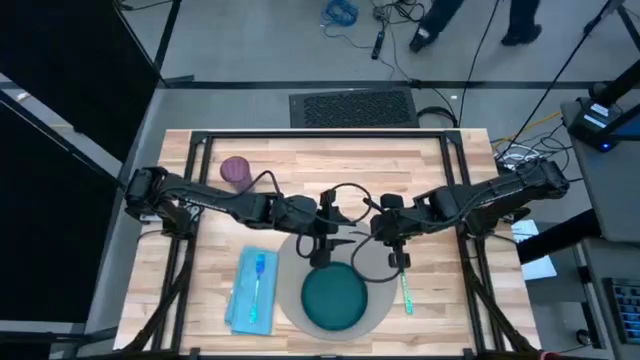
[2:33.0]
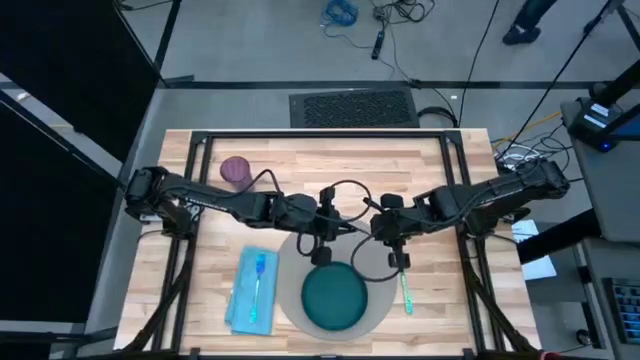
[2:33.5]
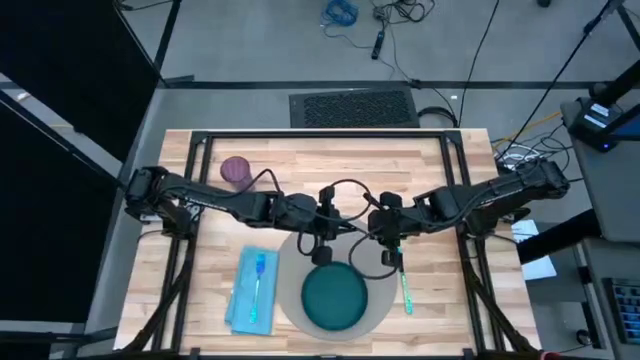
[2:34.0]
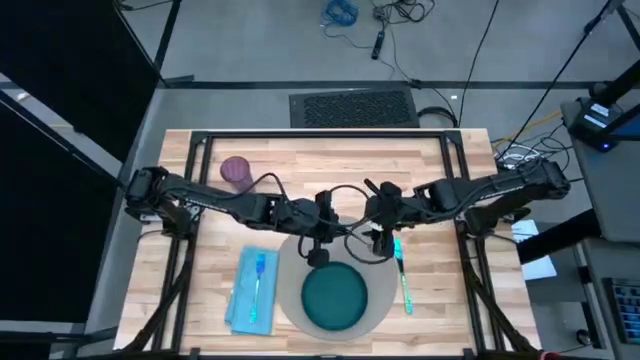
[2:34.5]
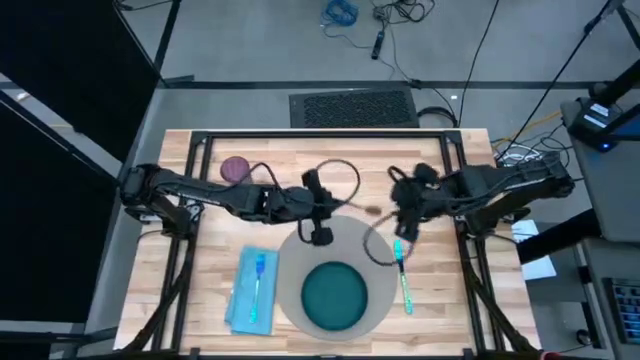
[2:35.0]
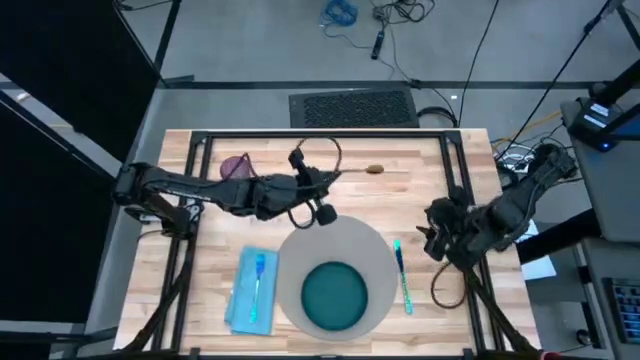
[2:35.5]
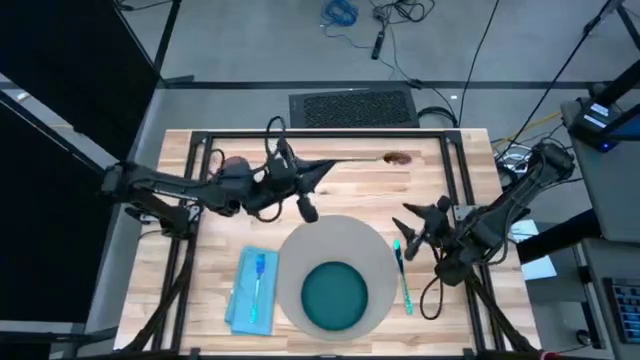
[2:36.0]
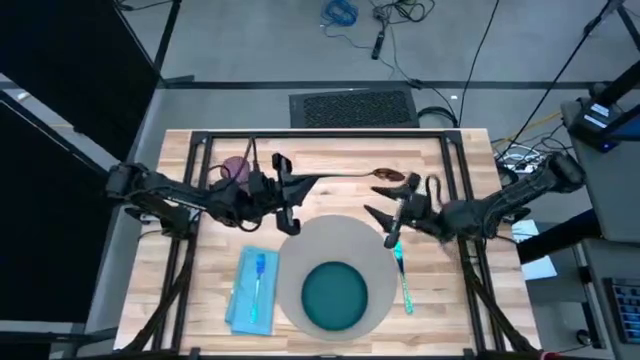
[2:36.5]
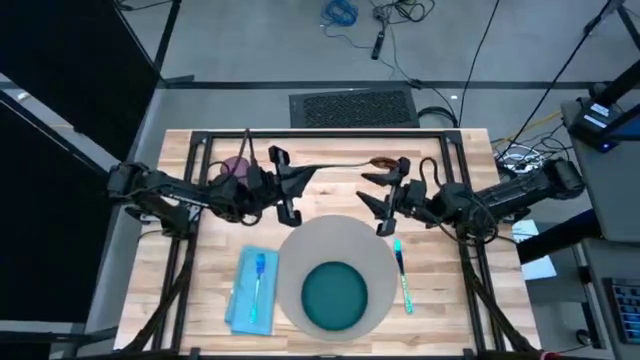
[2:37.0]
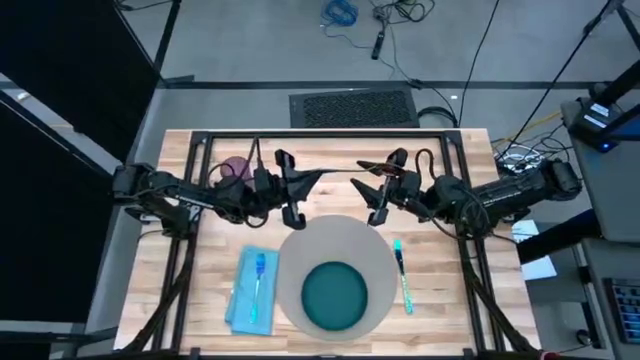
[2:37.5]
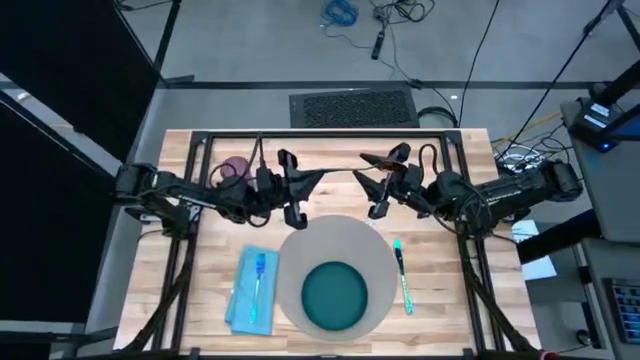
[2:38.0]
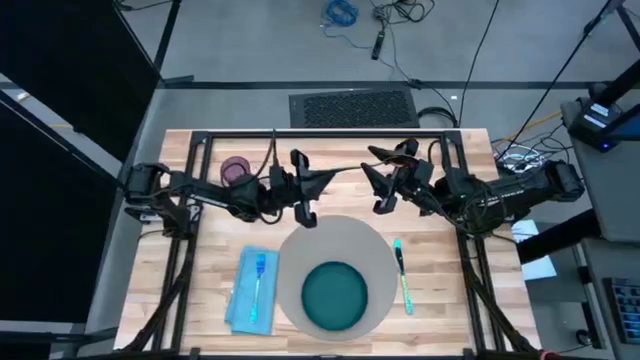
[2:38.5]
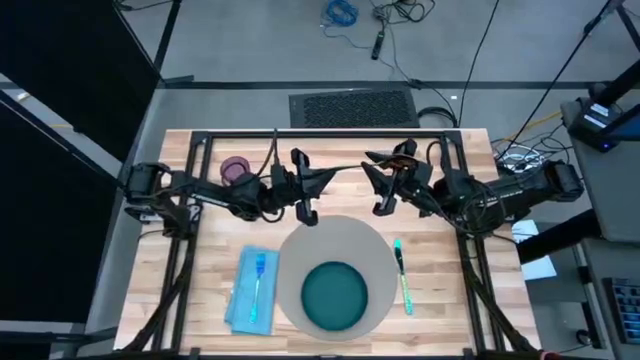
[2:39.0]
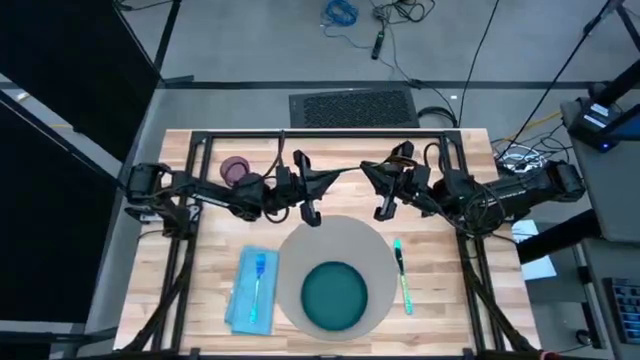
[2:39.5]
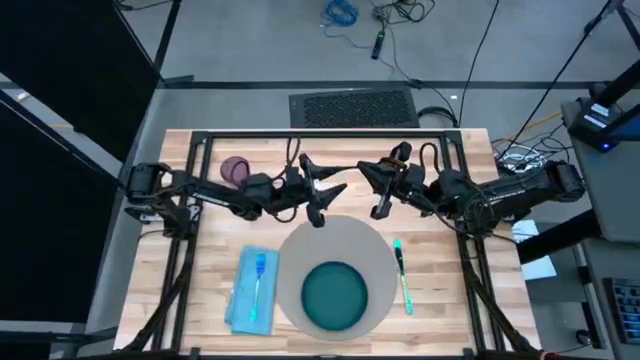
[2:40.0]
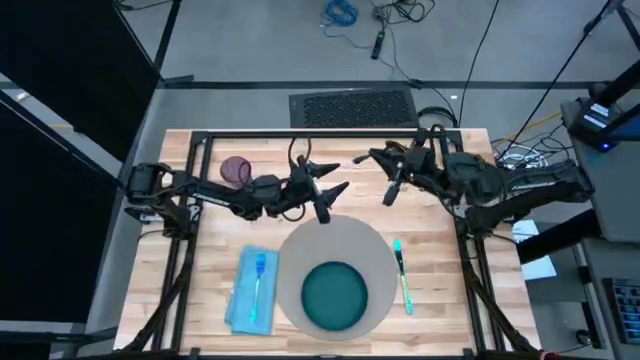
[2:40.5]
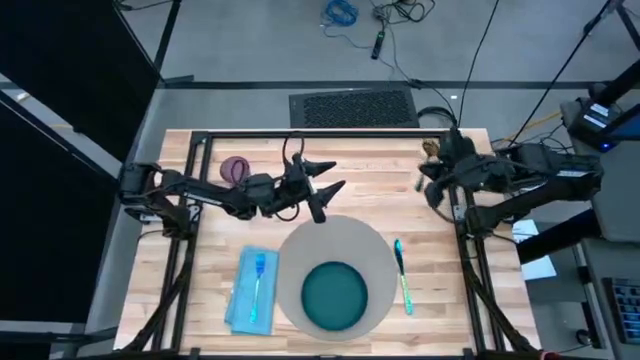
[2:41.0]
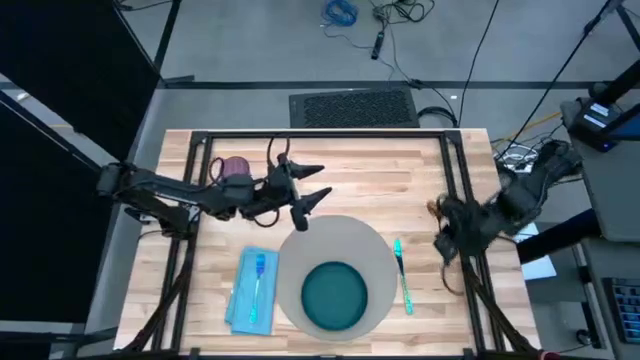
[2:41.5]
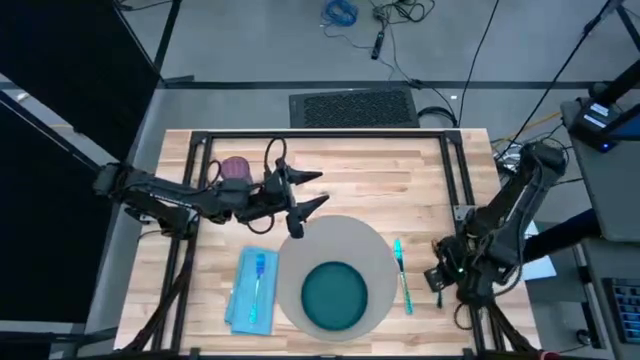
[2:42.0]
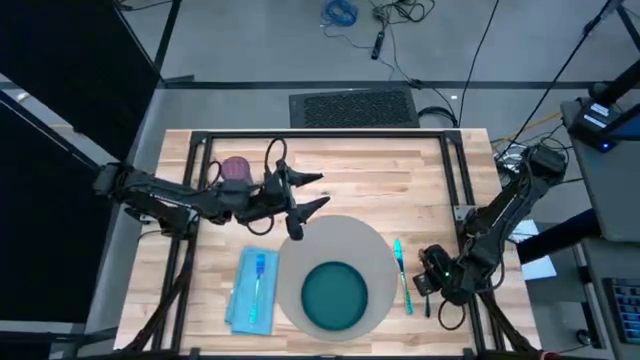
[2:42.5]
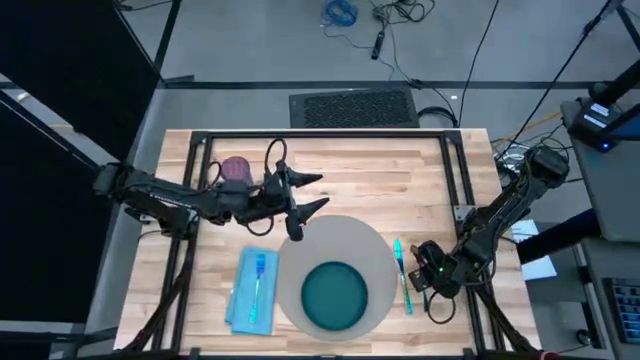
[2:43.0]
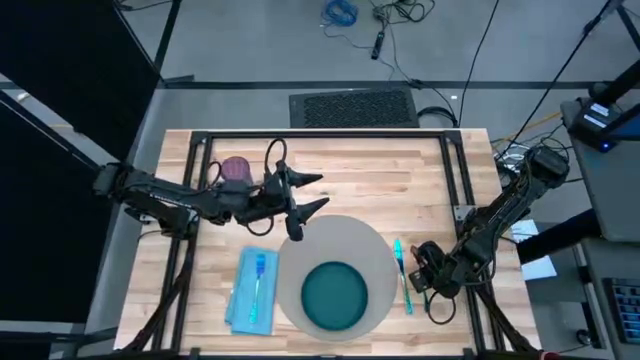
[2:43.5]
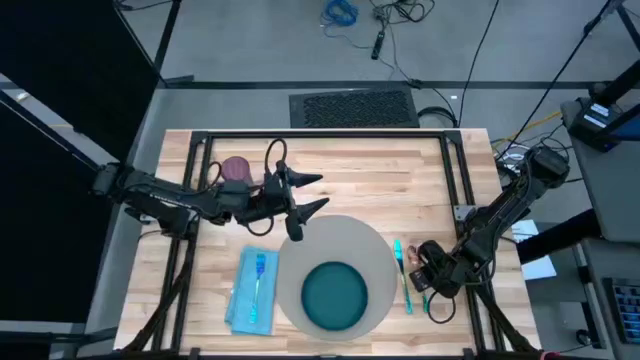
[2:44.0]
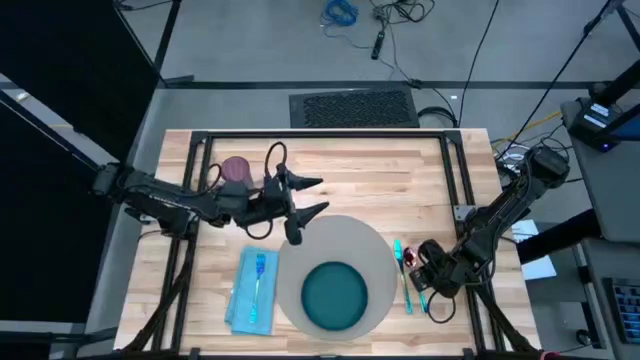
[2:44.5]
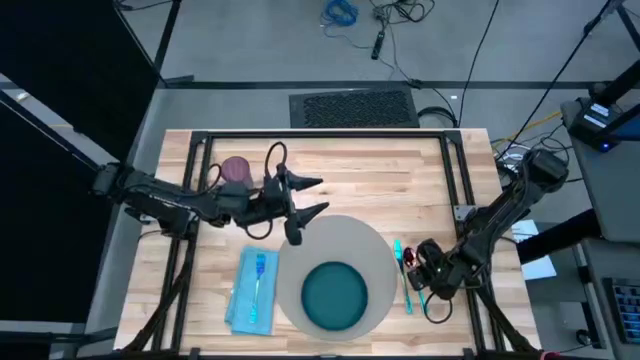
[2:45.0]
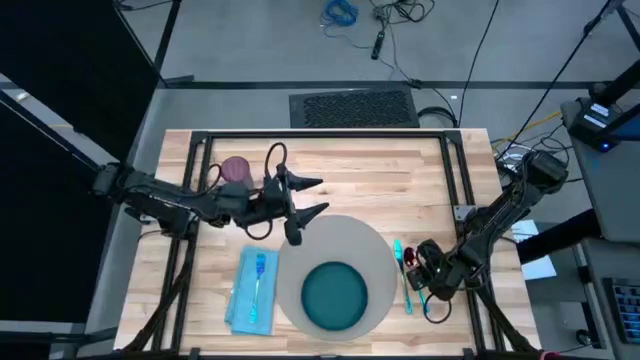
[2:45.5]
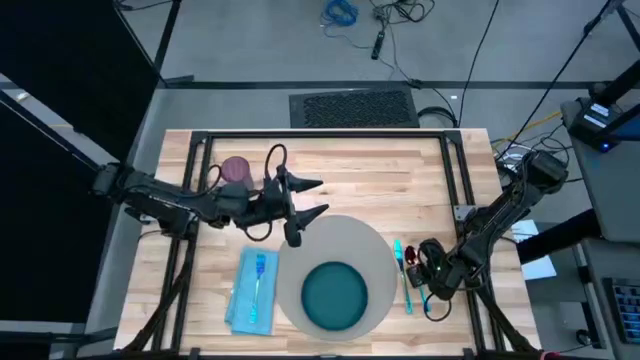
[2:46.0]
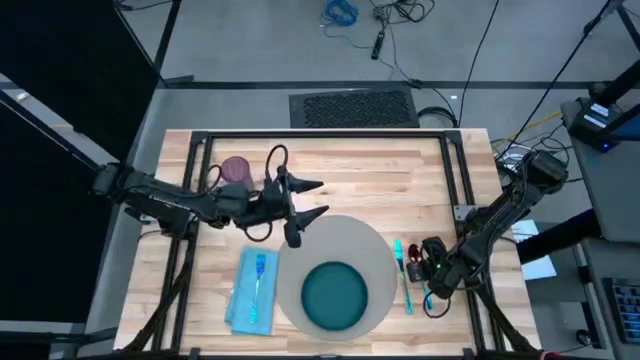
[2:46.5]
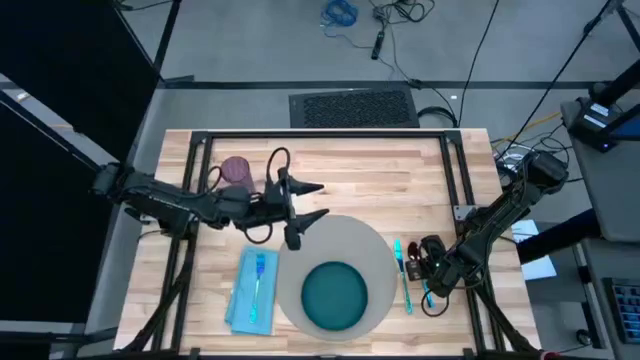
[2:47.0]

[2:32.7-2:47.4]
Task: Set table place
Put the blue spoon beside the blue knife on the table

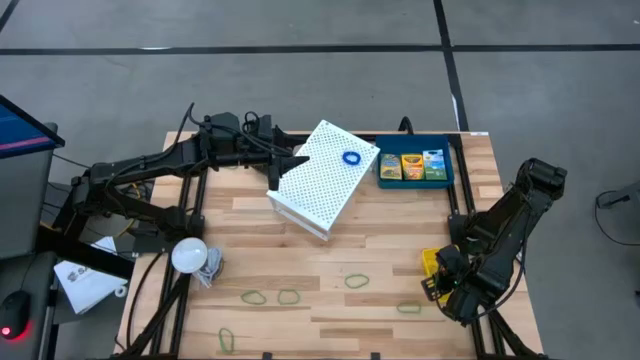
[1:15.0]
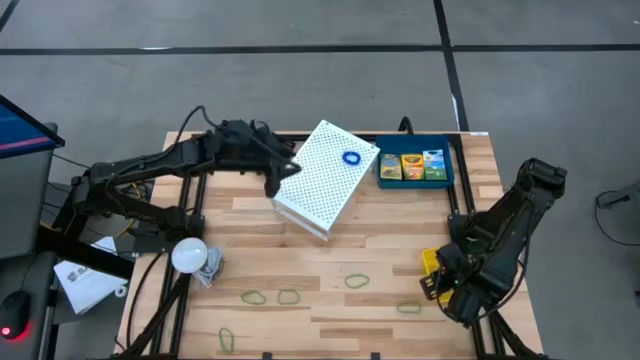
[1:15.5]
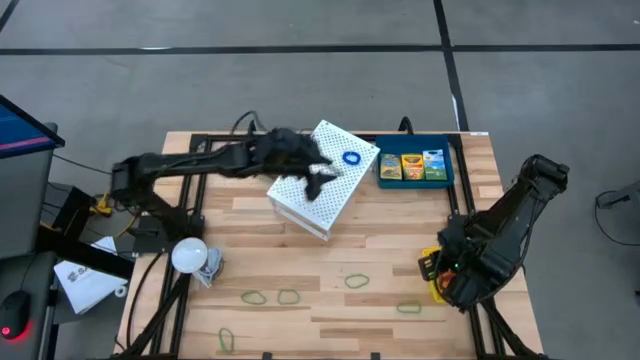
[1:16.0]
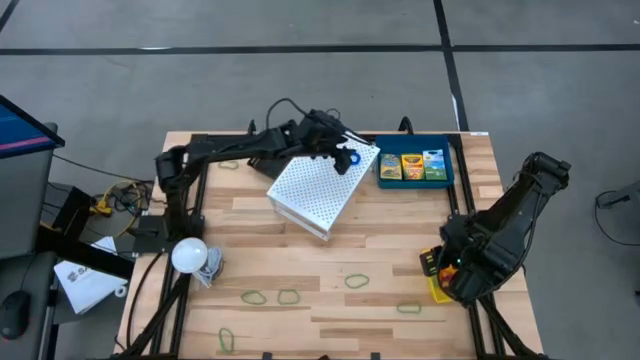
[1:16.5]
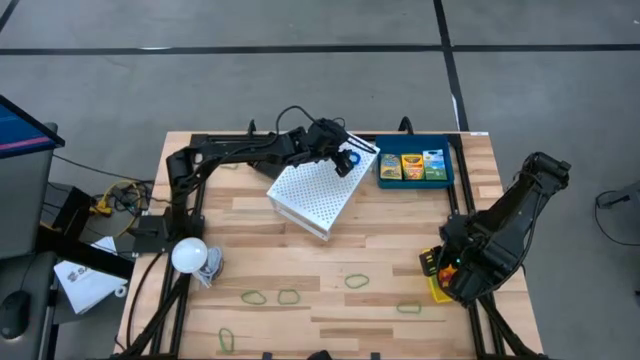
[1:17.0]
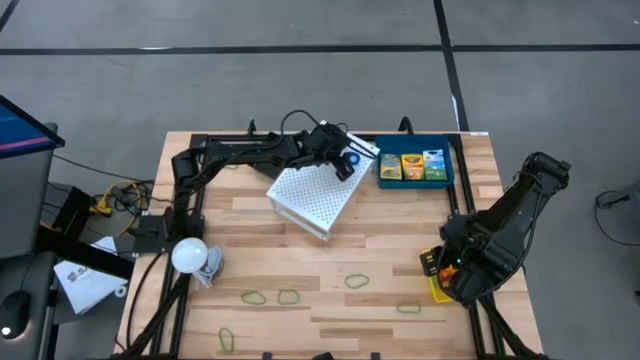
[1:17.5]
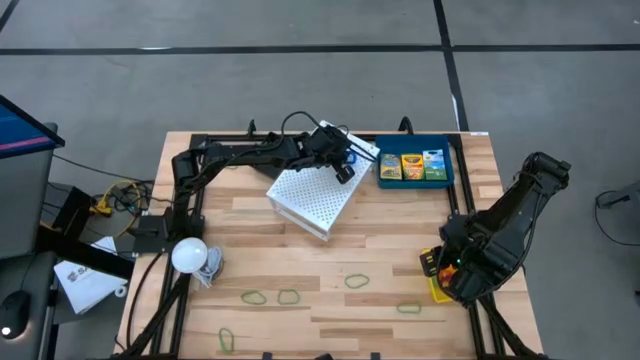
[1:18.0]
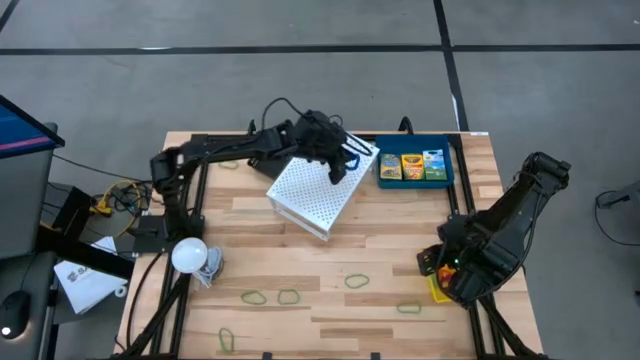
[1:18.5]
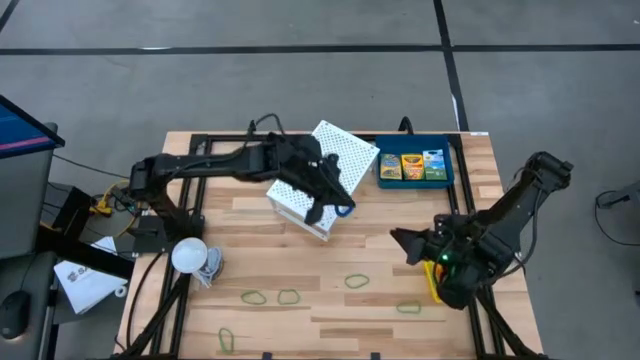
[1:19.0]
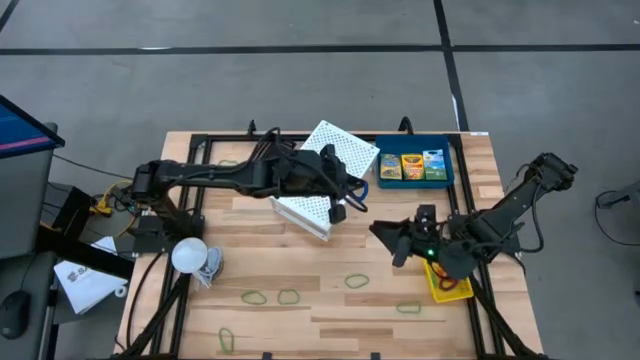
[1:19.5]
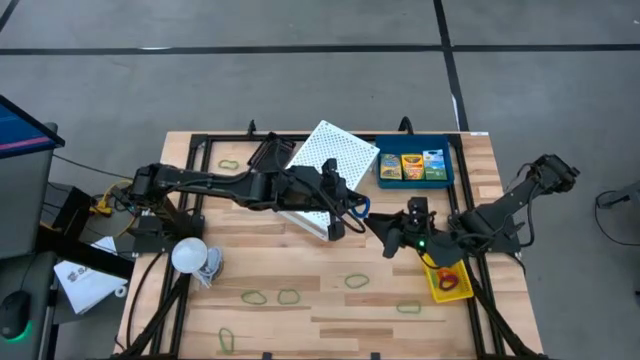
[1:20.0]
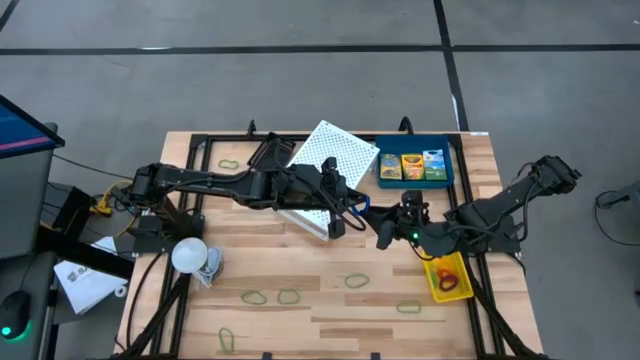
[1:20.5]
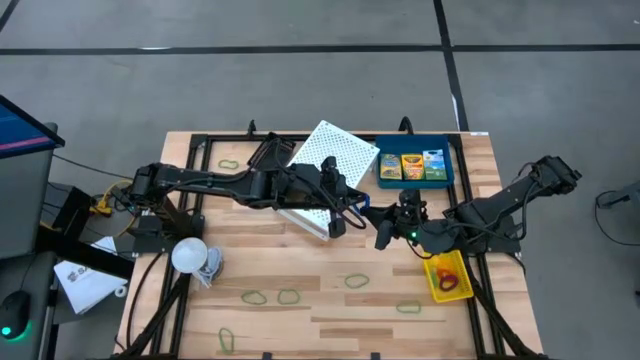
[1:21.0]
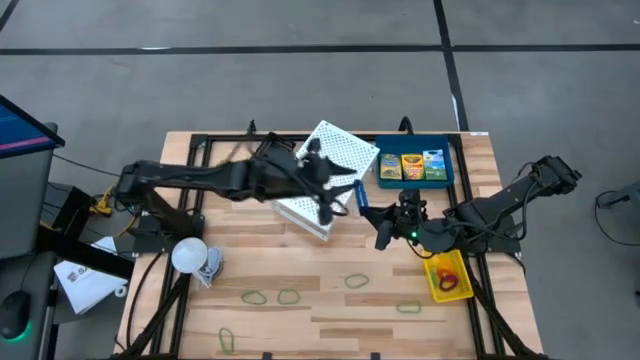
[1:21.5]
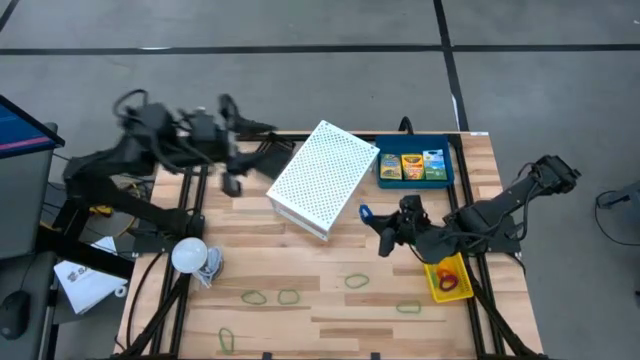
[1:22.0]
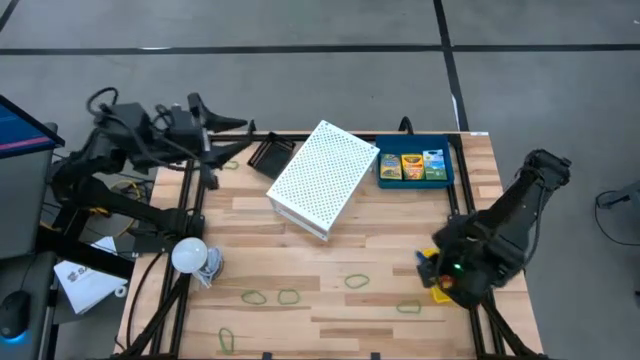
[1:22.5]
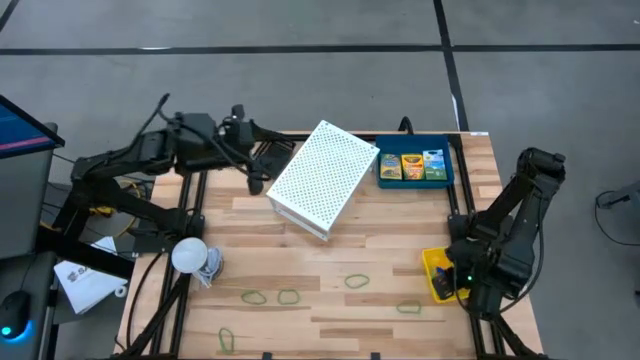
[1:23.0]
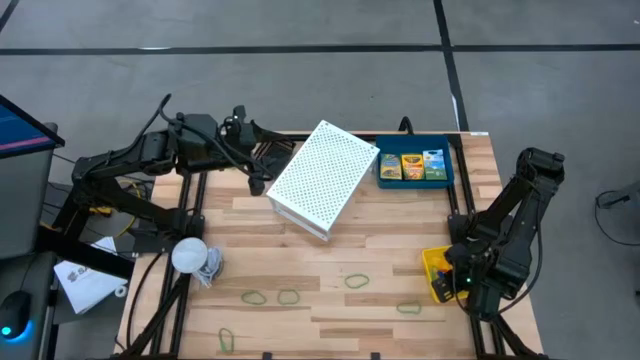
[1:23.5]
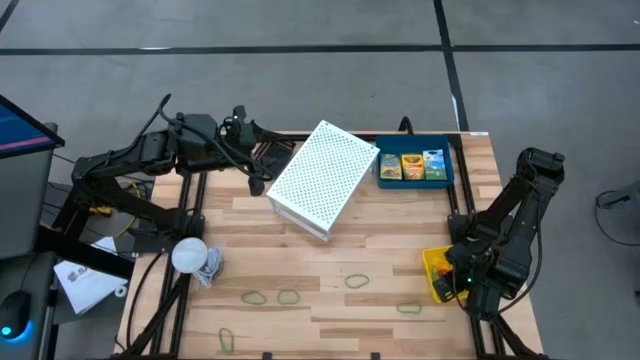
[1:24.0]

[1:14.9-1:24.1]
Task: Pick & Place Office Desk Supplies
Put the blue spring keychain into the yellow bin
